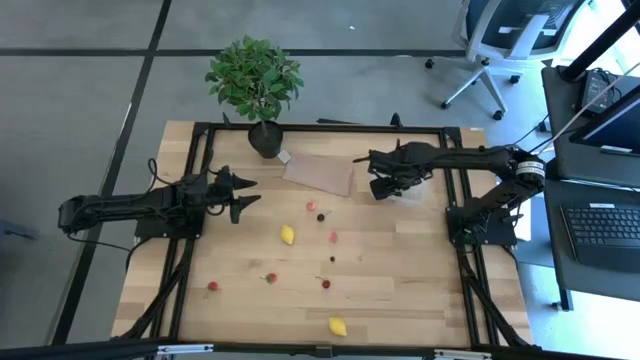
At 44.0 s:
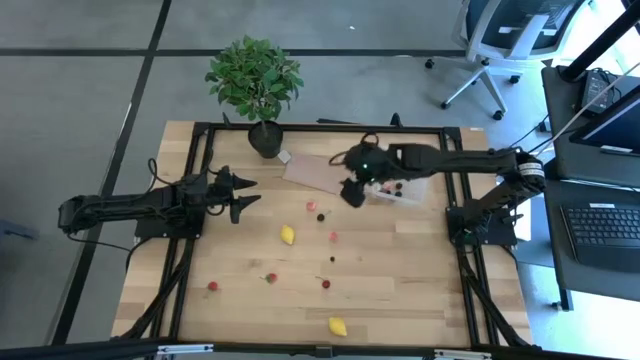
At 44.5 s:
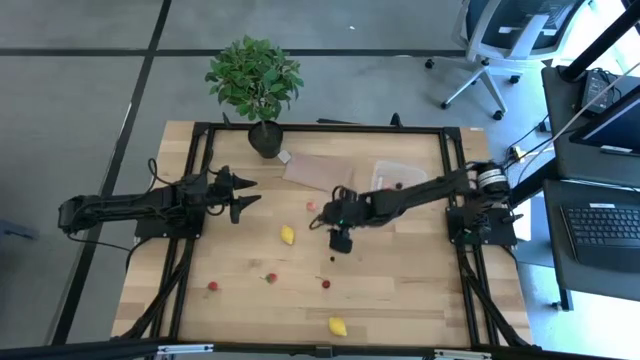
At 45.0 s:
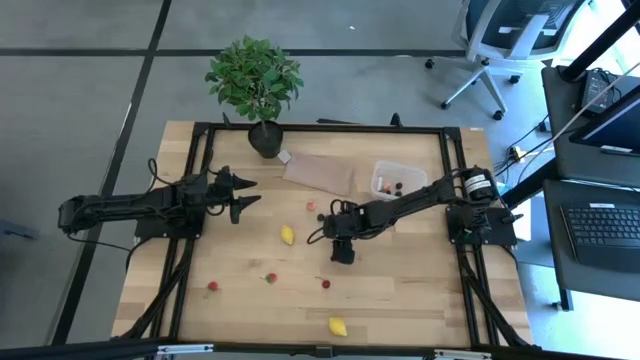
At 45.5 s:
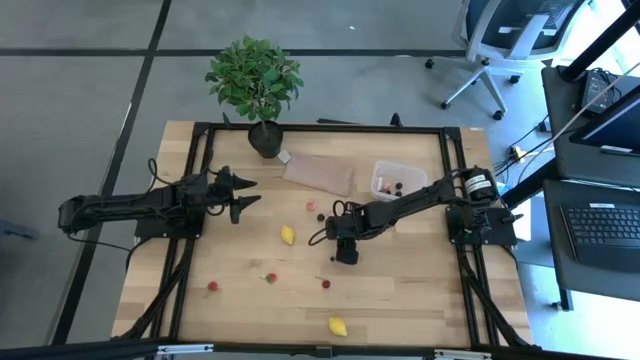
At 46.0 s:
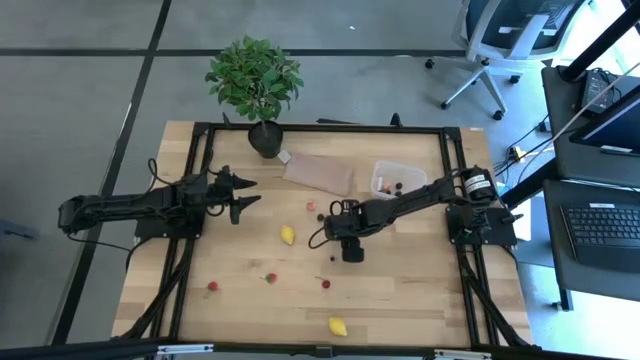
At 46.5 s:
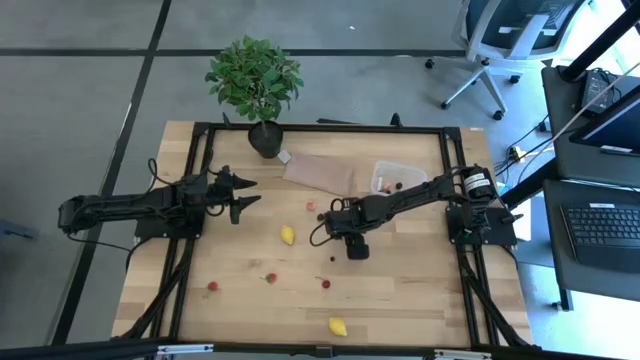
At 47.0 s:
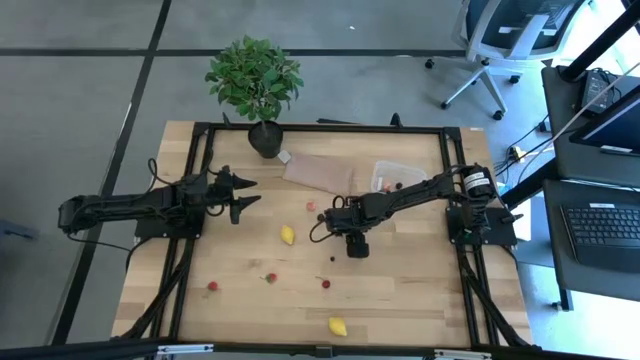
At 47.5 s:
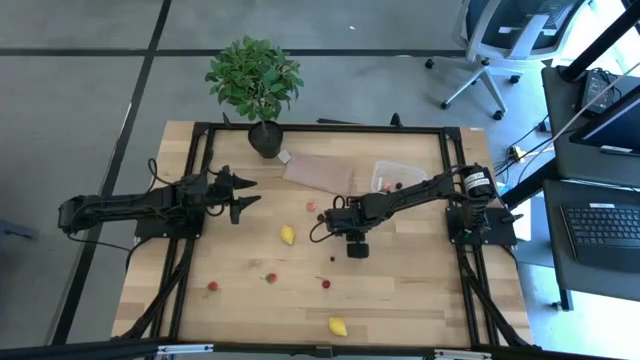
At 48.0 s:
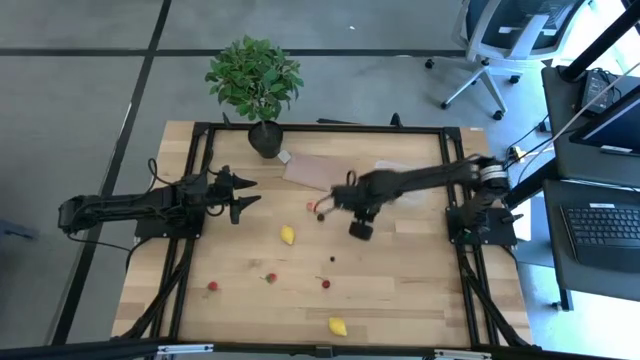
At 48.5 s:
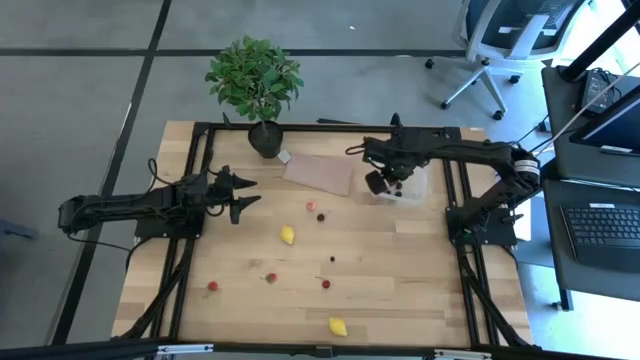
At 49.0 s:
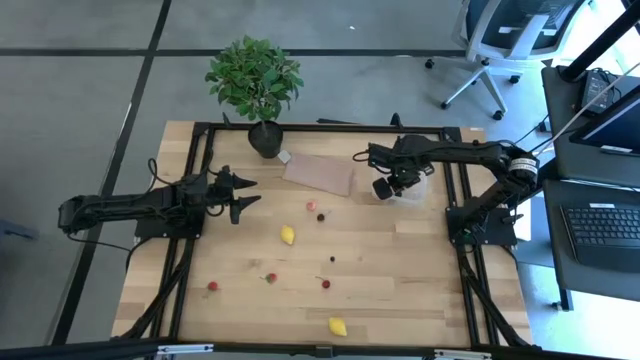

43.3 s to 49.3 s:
Task: Pick and placing Produce into tupperware
Put the right pink peach into the transparent container

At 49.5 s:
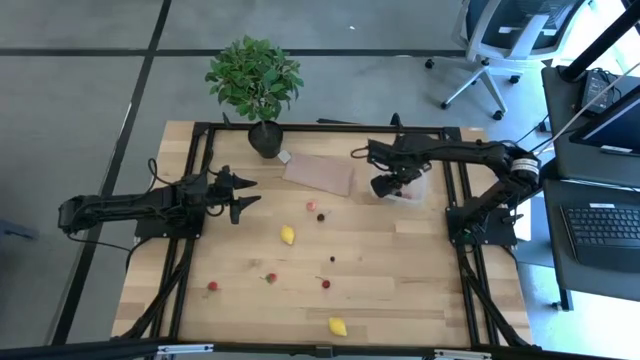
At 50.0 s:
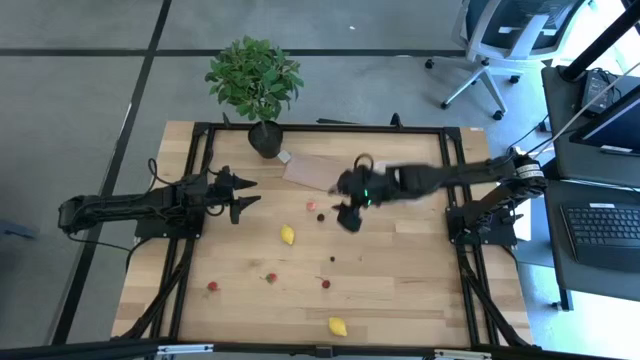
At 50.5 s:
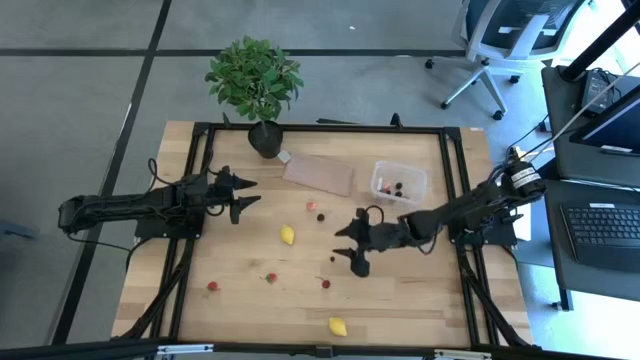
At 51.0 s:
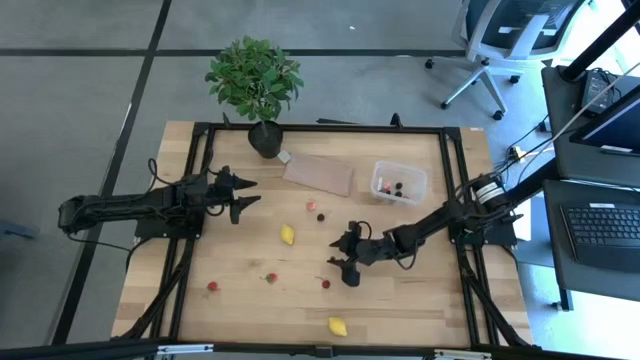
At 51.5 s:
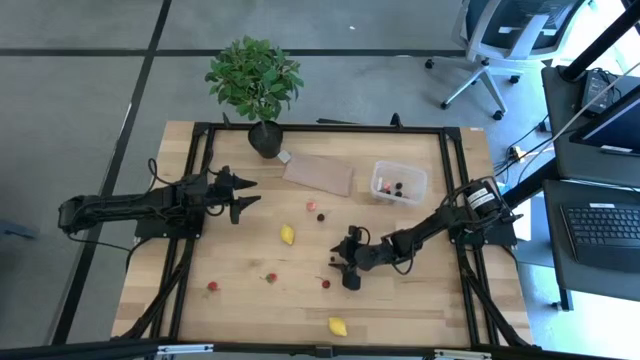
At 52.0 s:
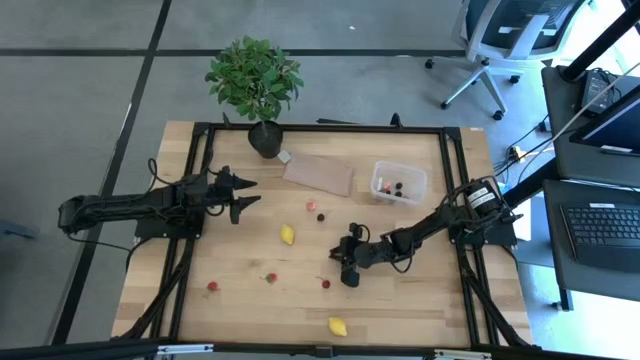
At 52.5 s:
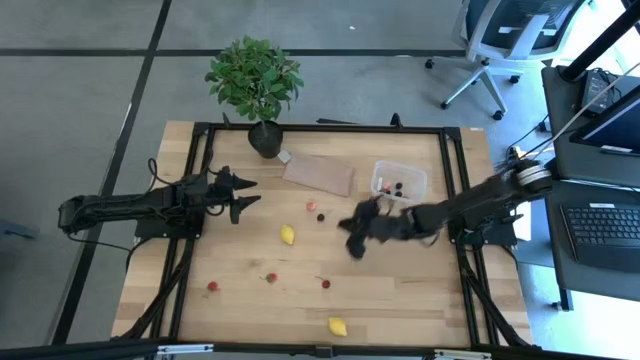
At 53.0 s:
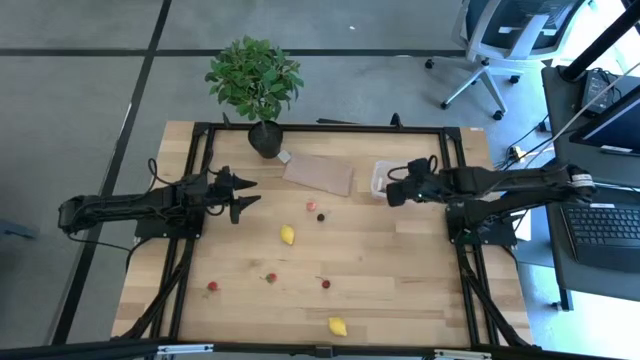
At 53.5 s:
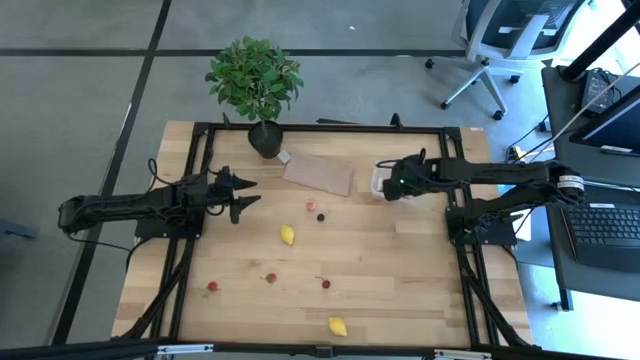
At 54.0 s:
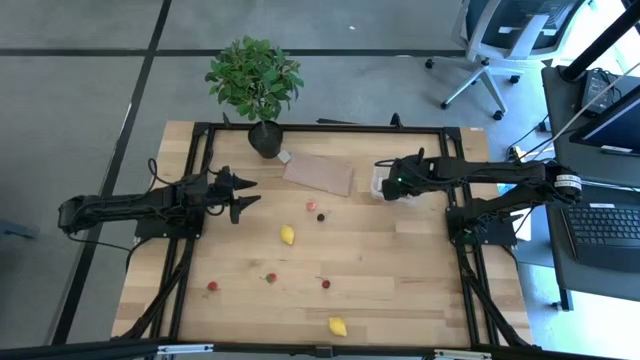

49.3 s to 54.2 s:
Put the blueberry into the transparent container

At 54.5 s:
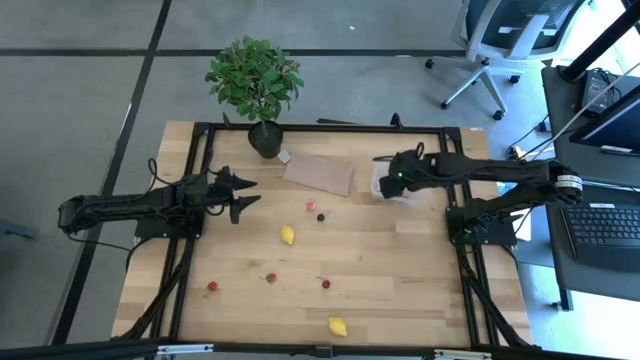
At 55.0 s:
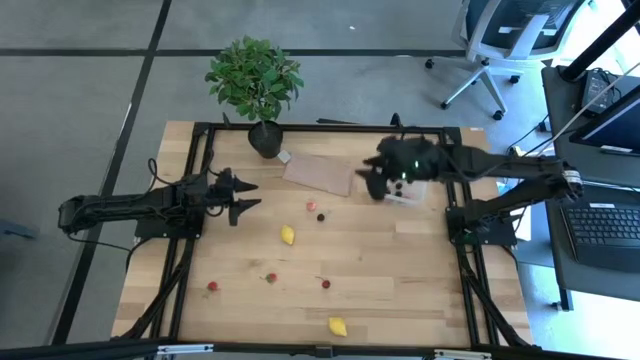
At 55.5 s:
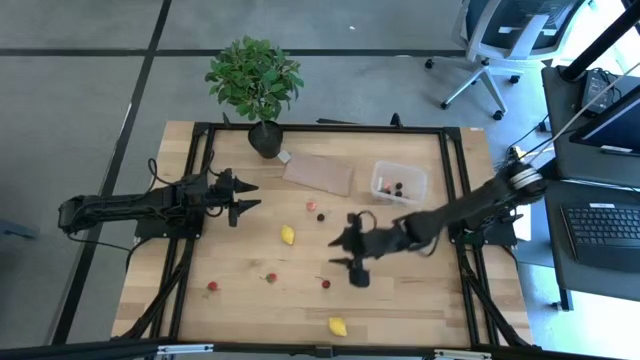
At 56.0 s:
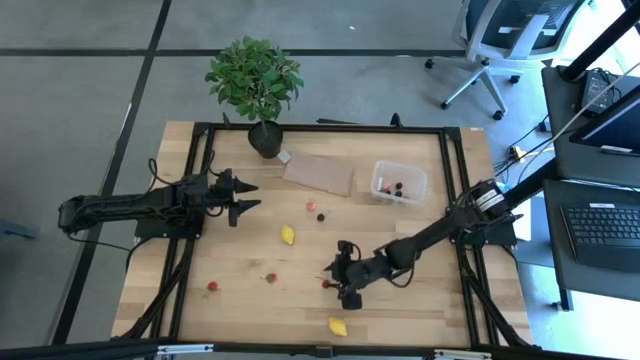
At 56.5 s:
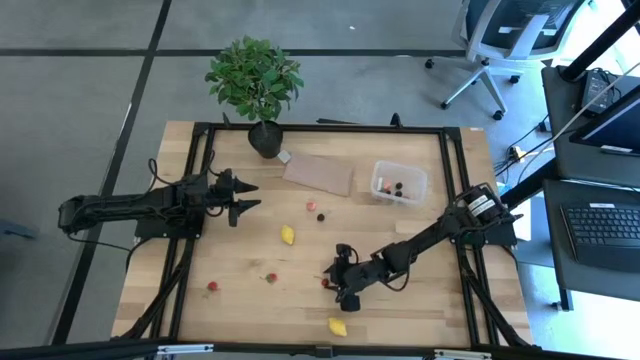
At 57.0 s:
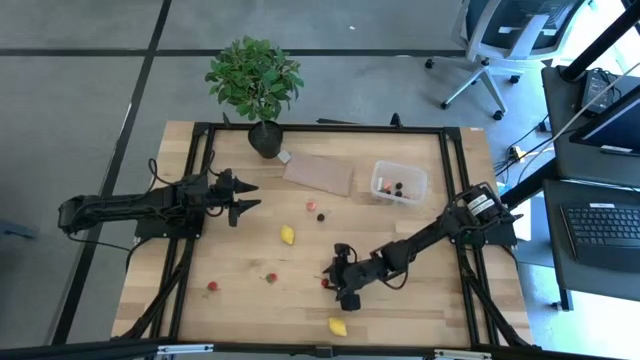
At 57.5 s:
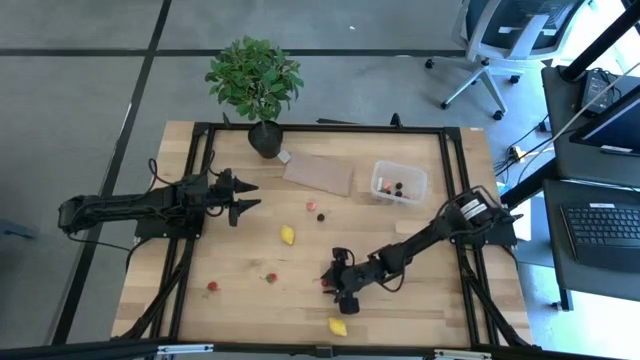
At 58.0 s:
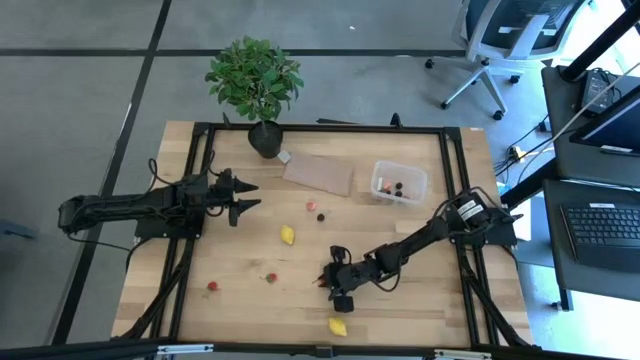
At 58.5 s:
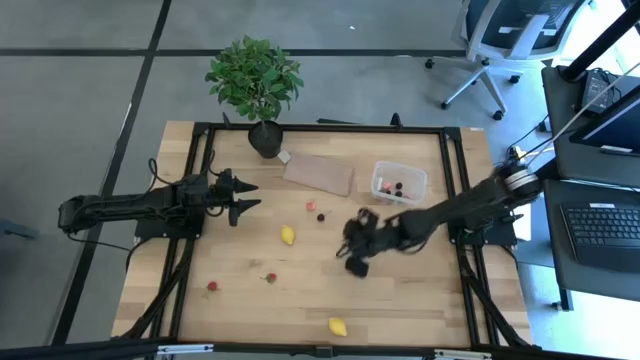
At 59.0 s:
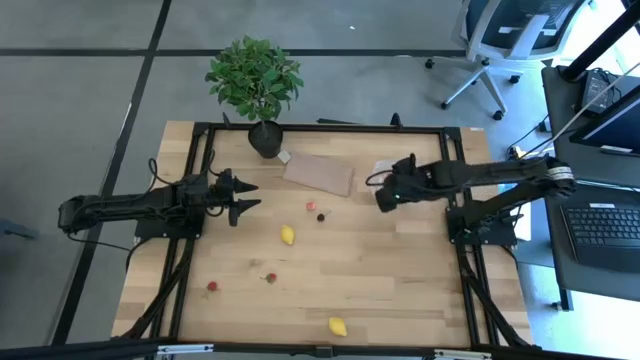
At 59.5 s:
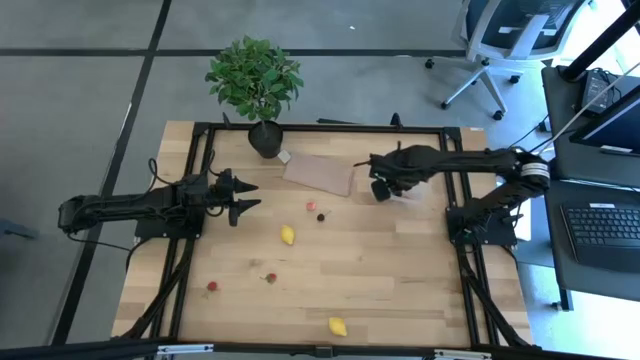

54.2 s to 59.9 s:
Put the red cherry into the transparent container

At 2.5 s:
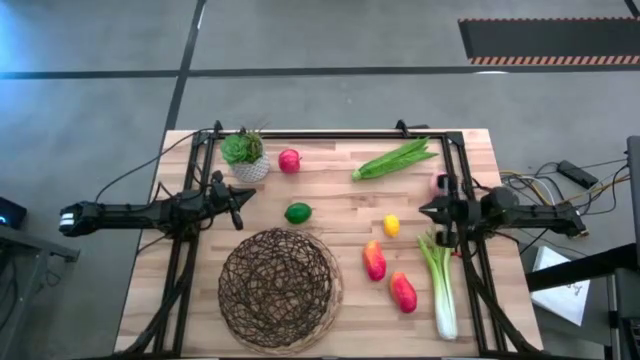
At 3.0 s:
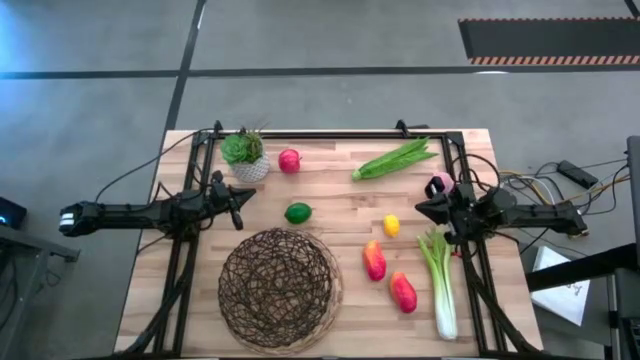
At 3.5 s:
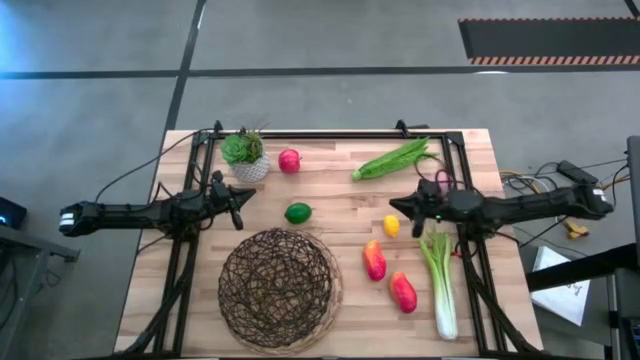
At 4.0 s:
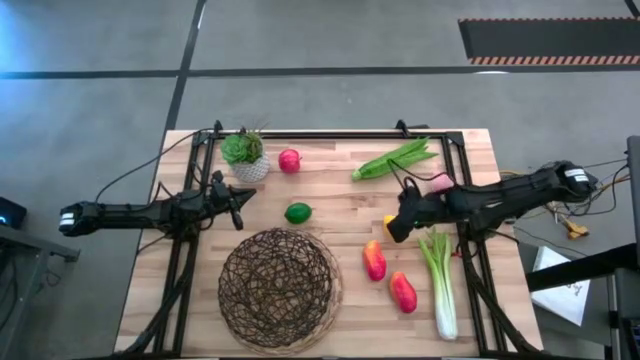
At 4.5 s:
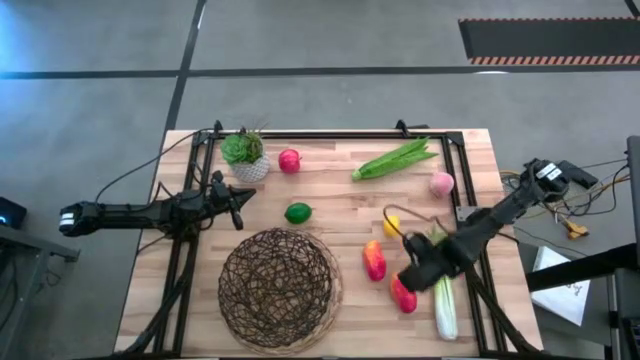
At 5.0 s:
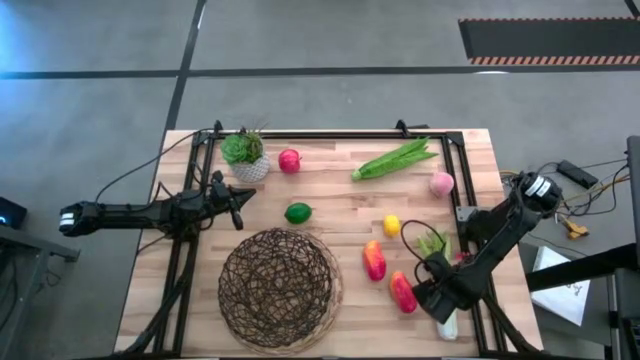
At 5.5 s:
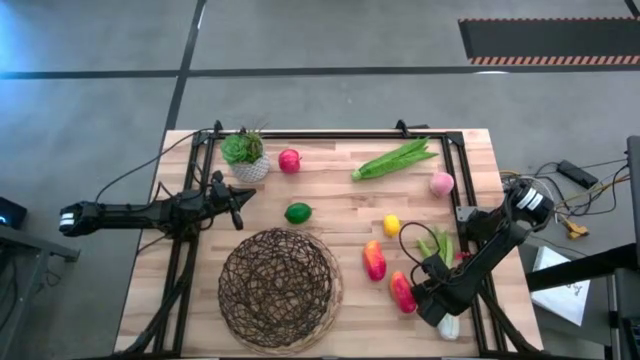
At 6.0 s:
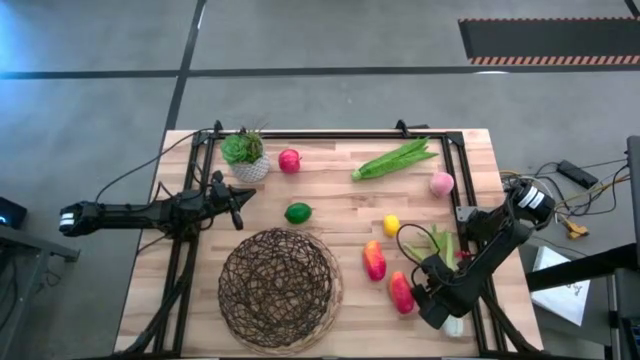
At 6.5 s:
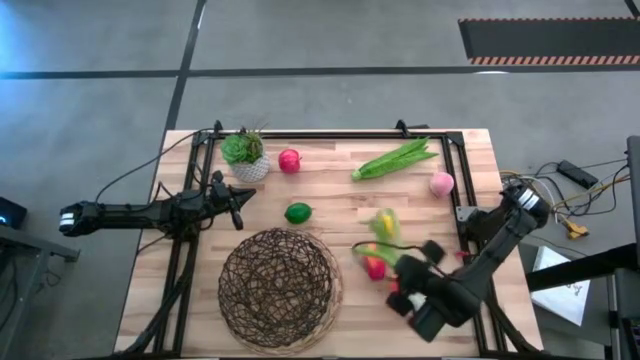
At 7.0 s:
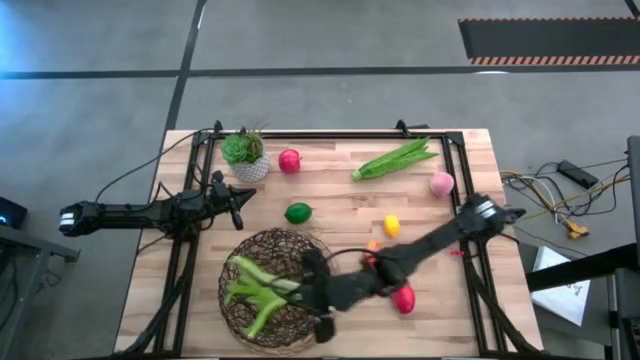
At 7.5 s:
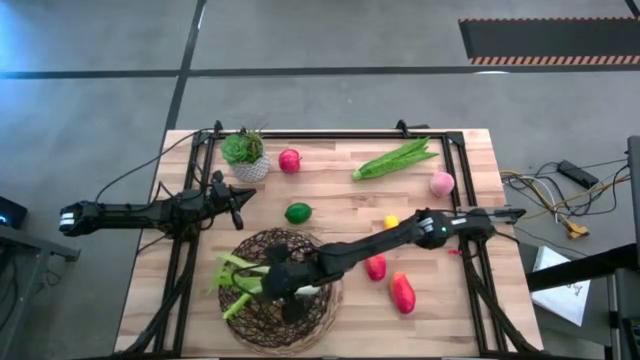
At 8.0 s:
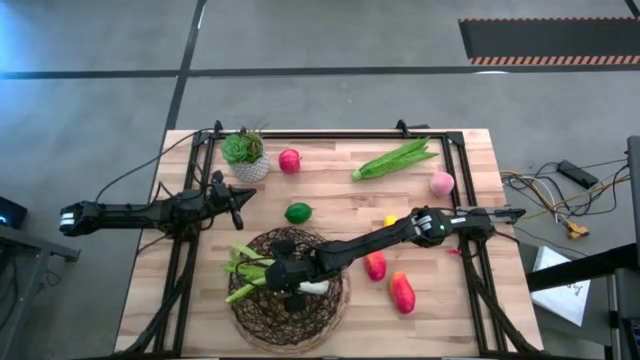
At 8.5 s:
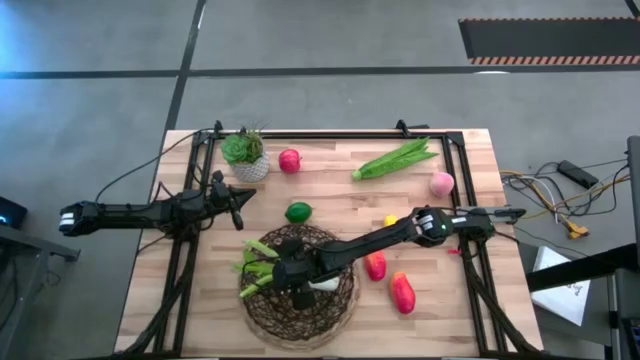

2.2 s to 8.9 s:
Task: Build produce basket
Put the celery into the mesh basket
